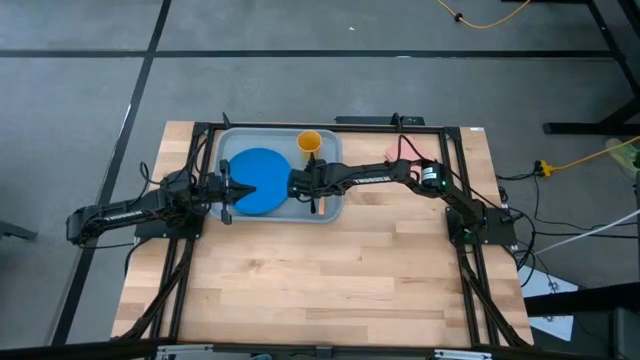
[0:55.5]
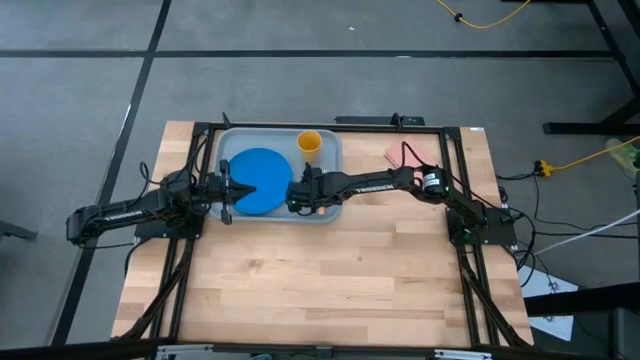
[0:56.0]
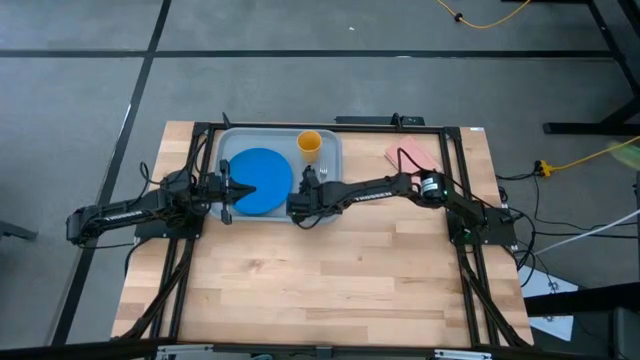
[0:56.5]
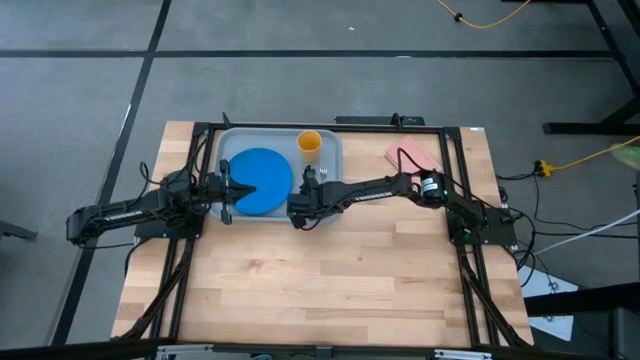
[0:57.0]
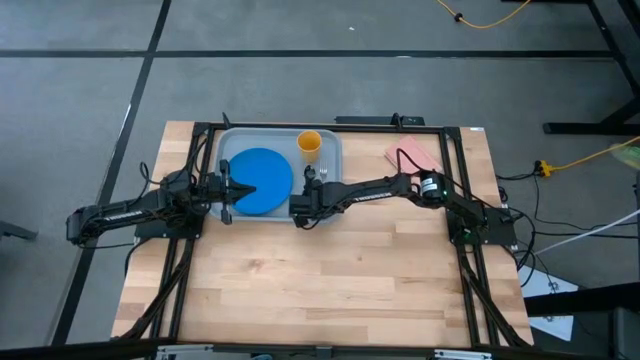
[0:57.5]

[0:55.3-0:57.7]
Task: Pick and place plate/cup/fork/spoon on tray
Adjust the light orange fork

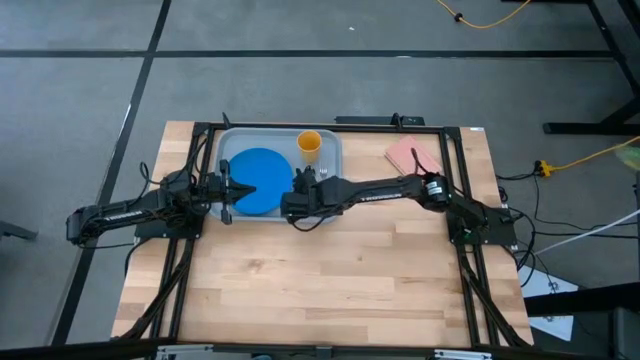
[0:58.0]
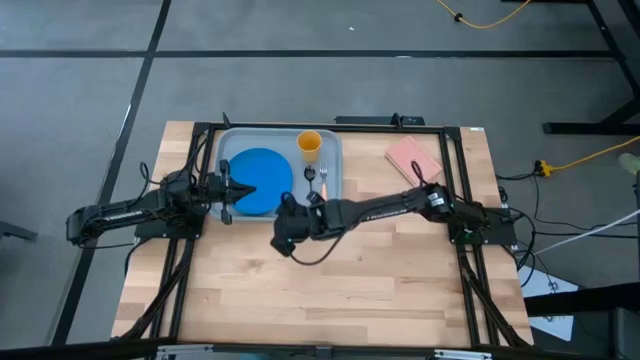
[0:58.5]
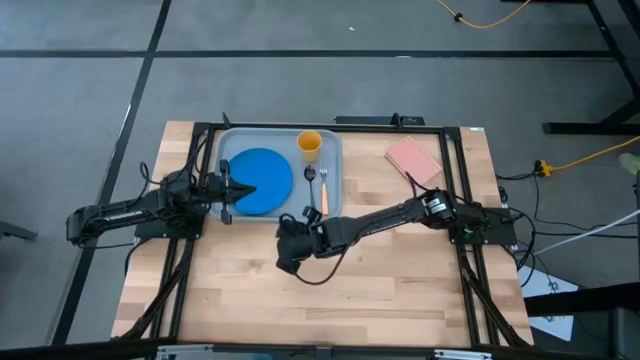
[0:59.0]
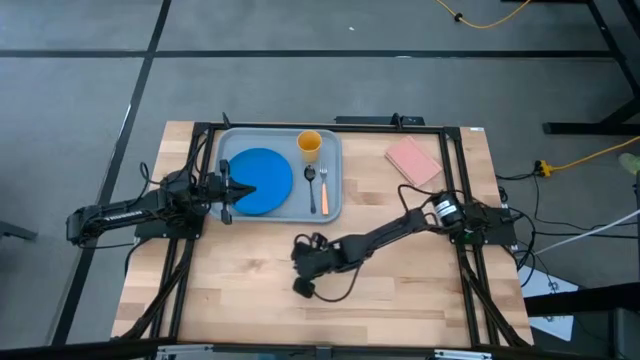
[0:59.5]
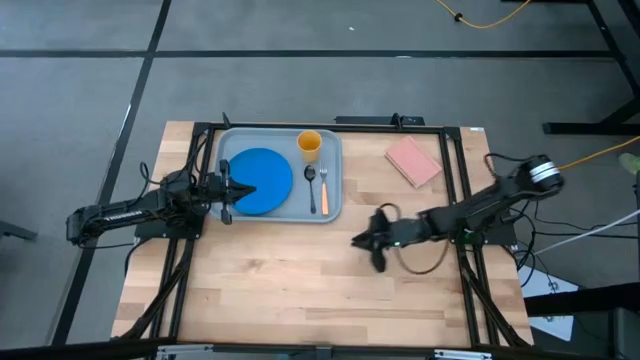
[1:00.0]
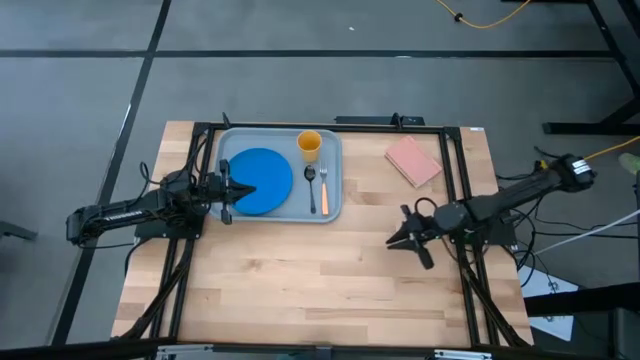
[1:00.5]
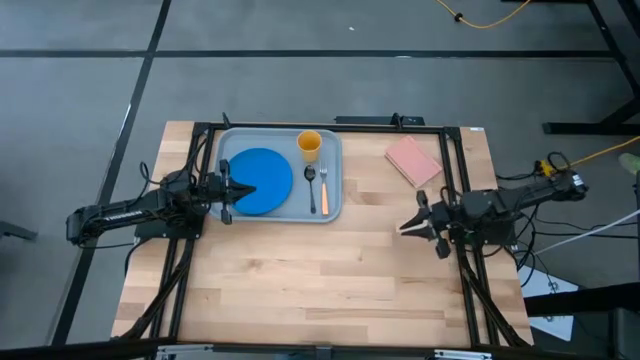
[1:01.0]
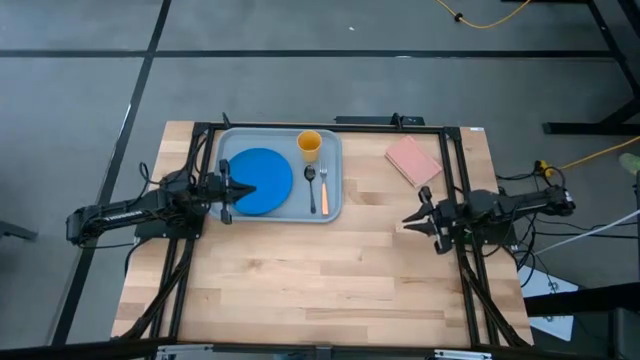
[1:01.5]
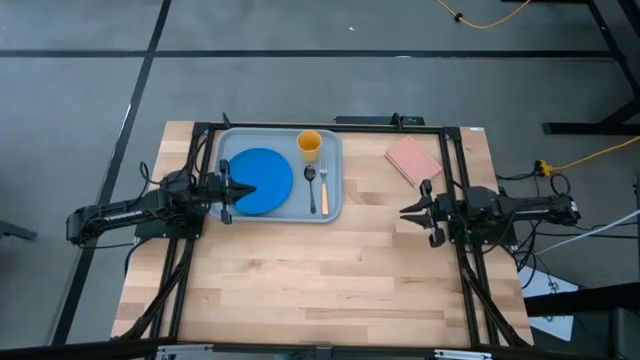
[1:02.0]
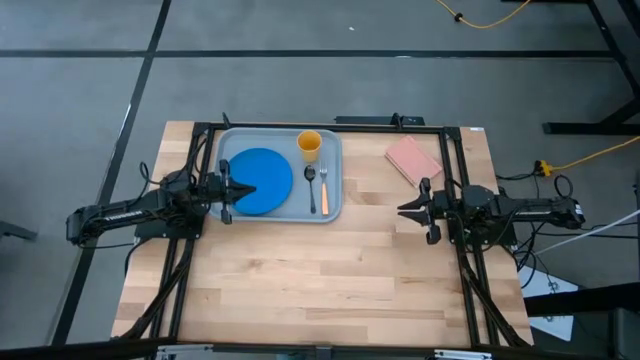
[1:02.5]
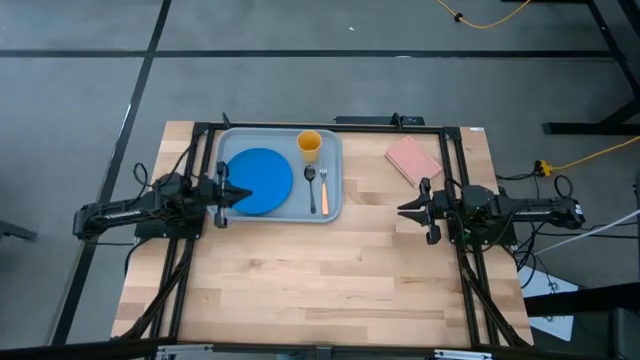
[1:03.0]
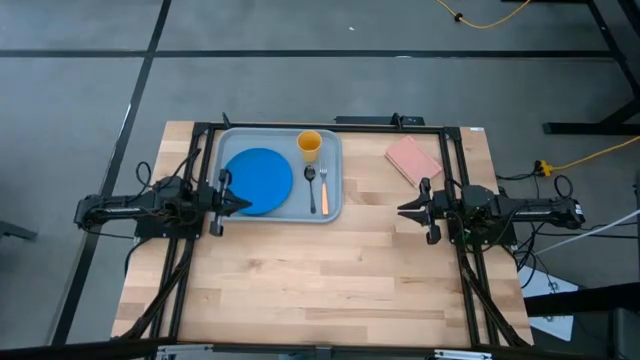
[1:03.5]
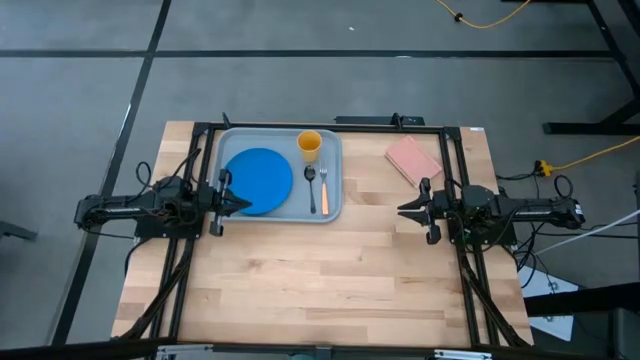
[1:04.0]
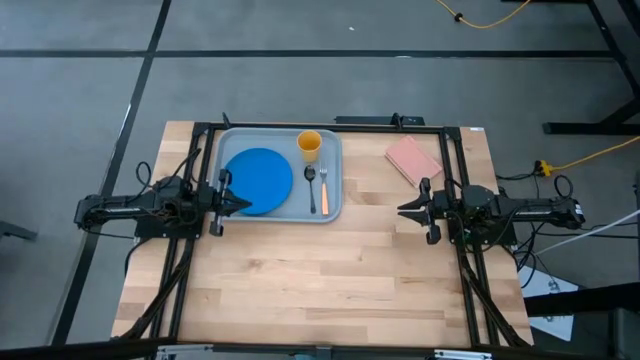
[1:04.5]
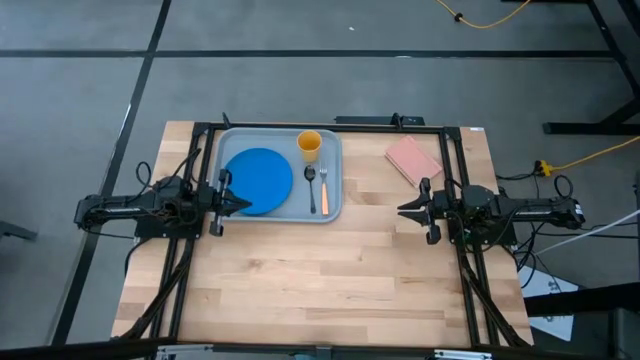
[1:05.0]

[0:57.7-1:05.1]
Return to Home Position

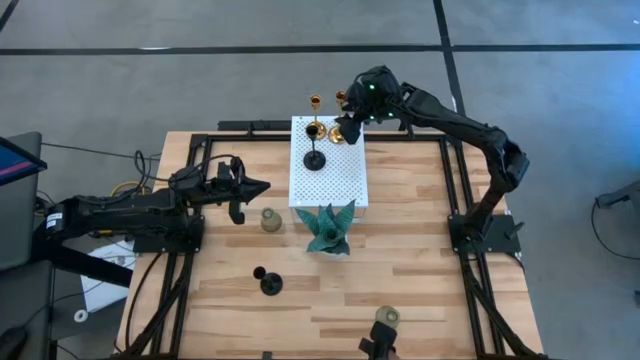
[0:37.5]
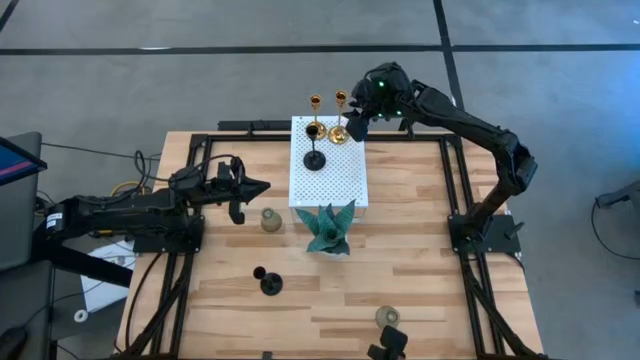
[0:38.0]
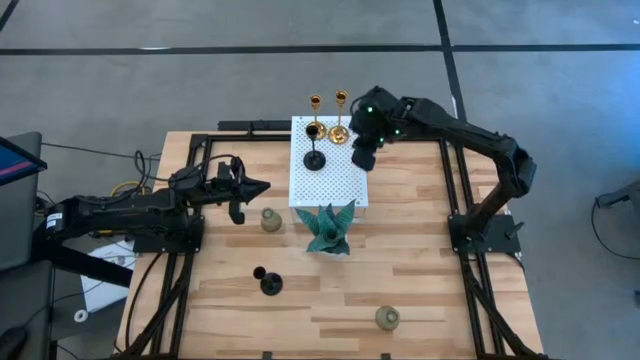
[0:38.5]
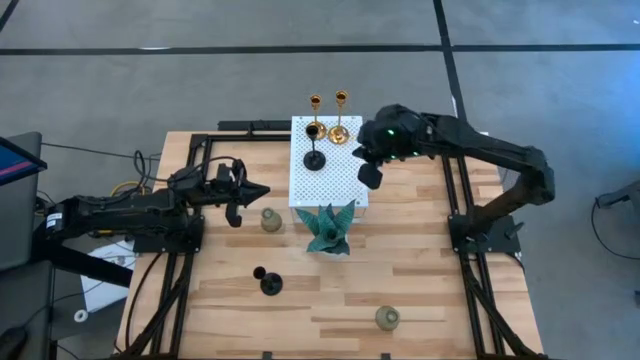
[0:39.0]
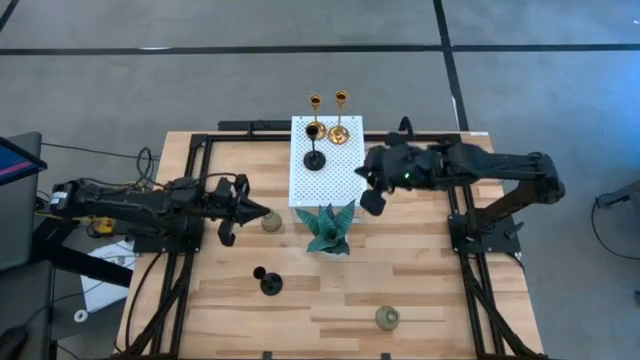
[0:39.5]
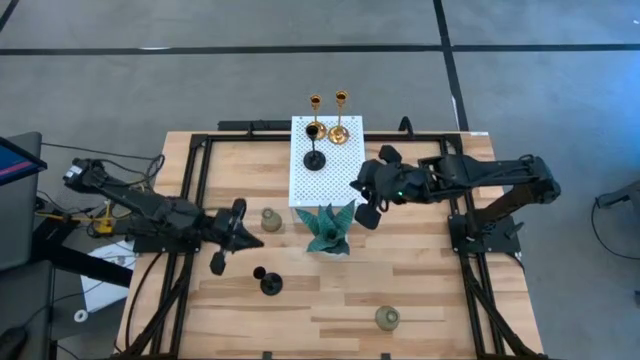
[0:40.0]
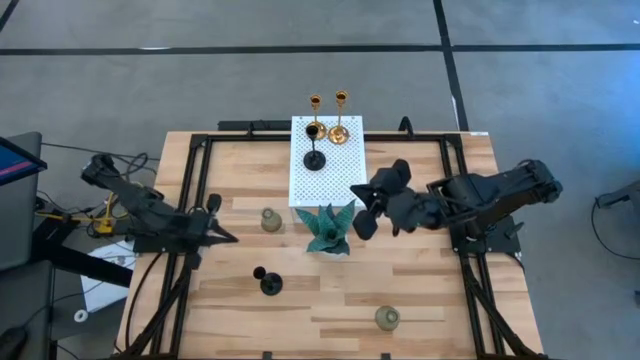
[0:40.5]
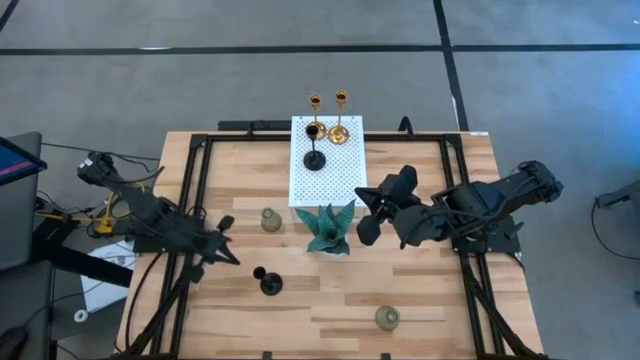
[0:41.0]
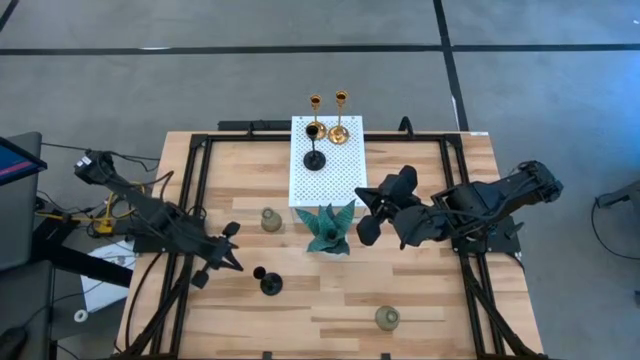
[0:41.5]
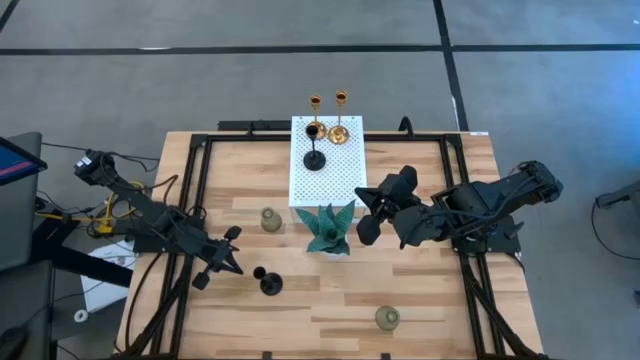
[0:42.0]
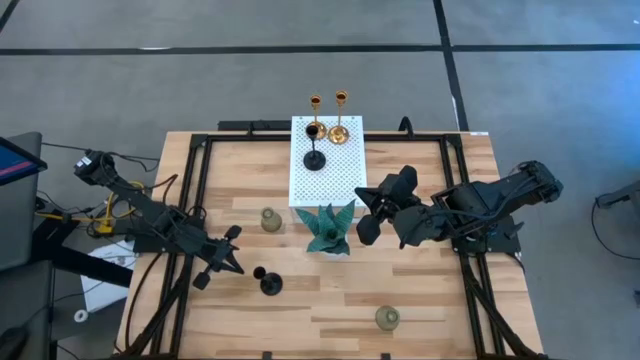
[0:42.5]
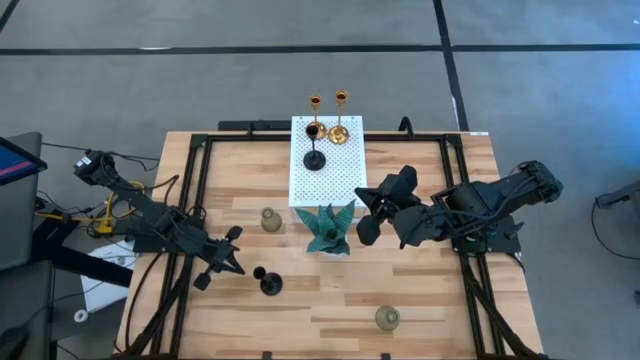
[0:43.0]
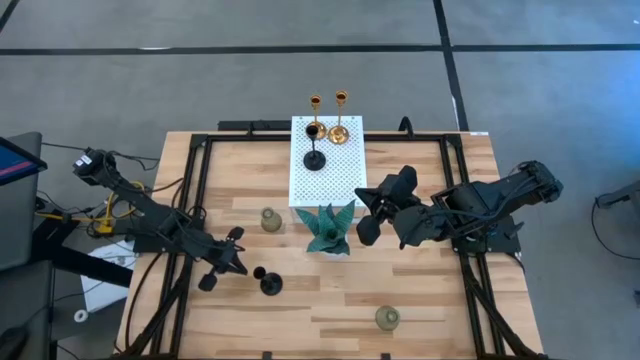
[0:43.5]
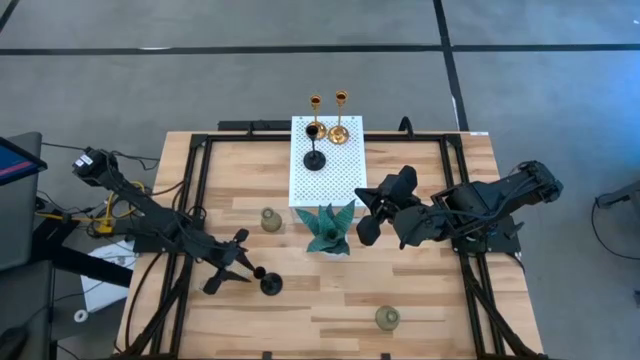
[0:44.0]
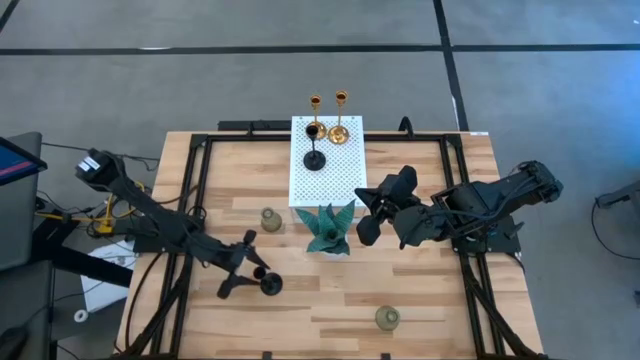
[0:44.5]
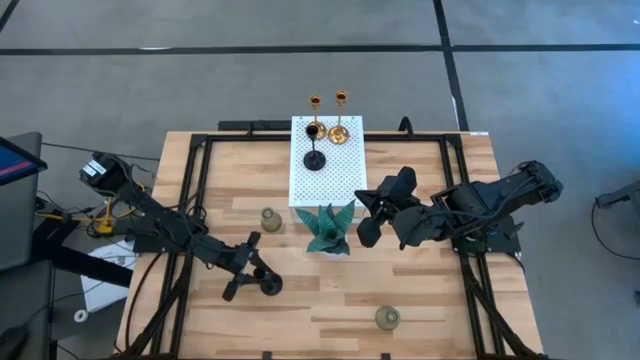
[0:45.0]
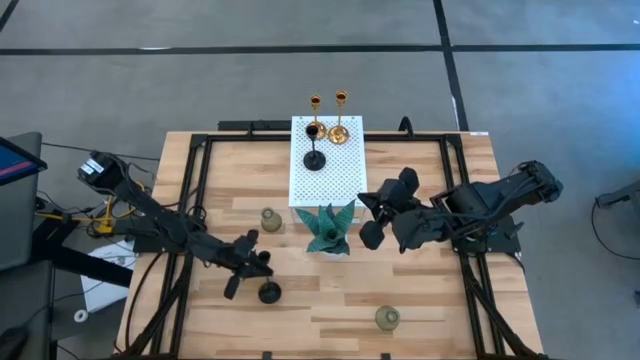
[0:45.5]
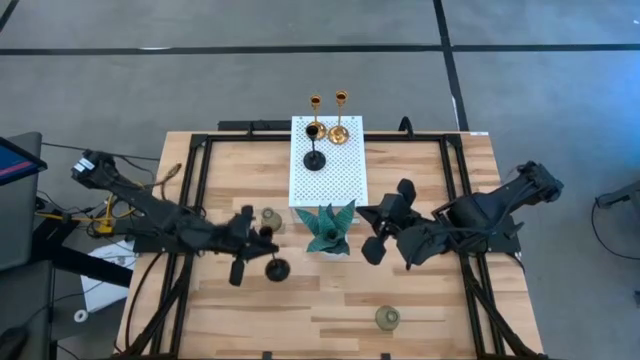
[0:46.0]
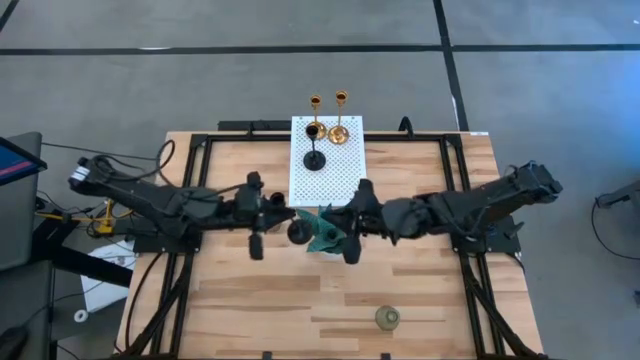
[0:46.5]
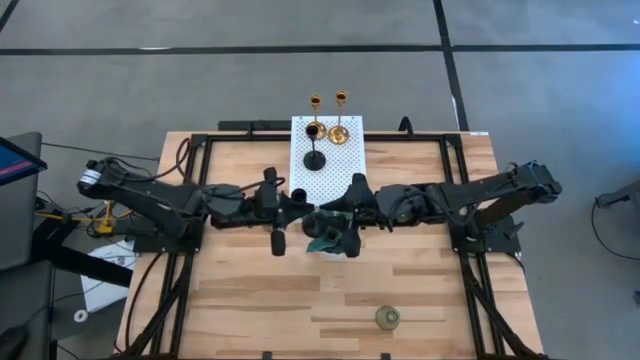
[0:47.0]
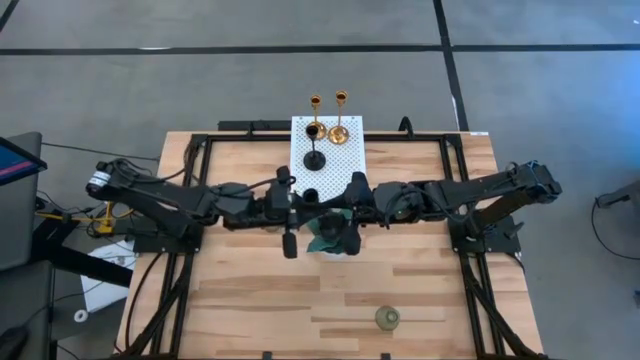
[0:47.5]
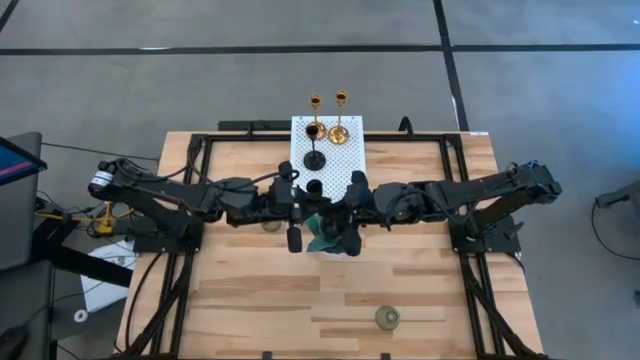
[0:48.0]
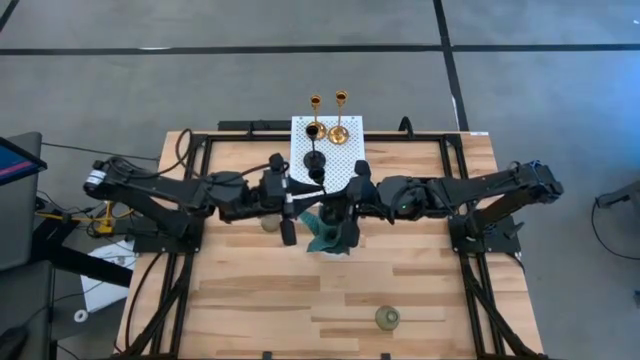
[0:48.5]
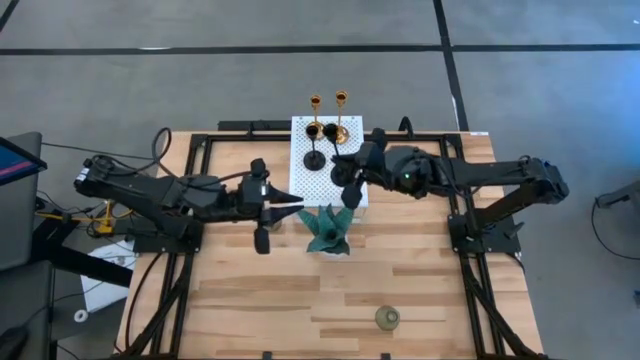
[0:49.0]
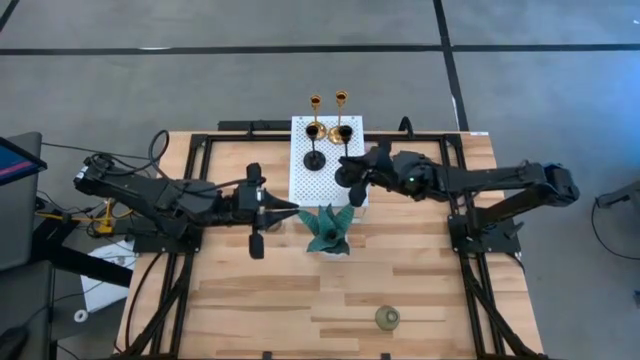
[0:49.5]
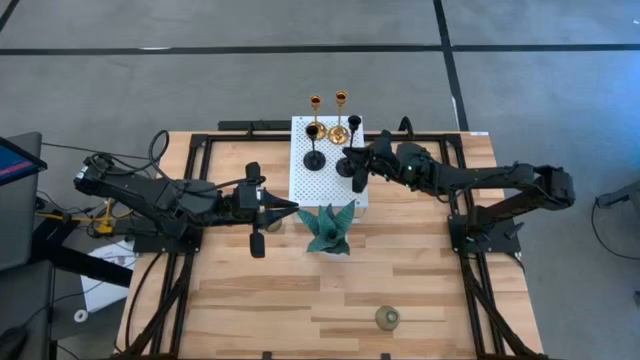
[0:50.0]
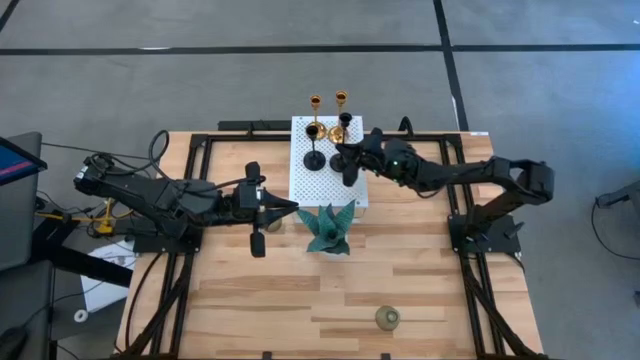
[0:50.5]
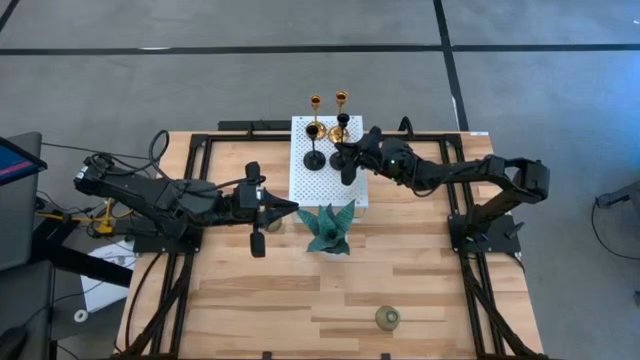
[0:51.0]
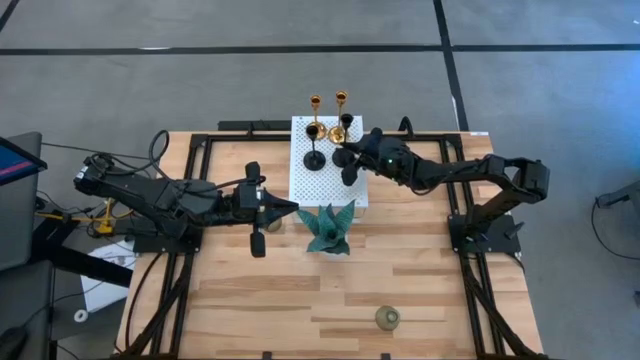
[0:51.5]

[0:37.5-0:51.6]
Task: Pick & Place candle stick holders
Put the black candle holder on the shelf aligned with the black candle holder
